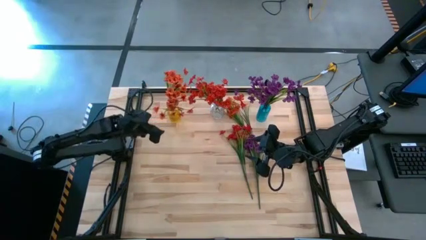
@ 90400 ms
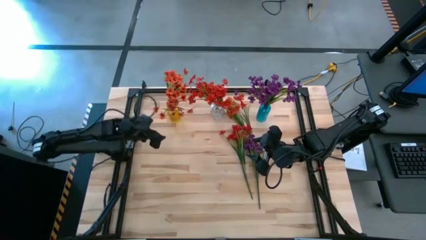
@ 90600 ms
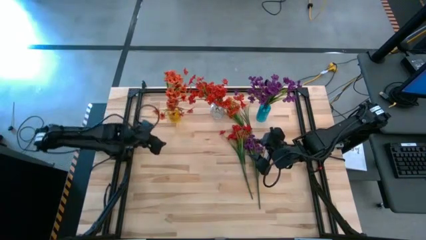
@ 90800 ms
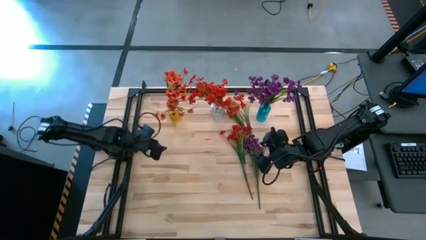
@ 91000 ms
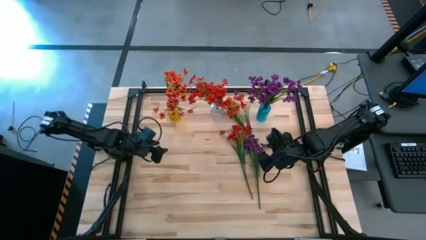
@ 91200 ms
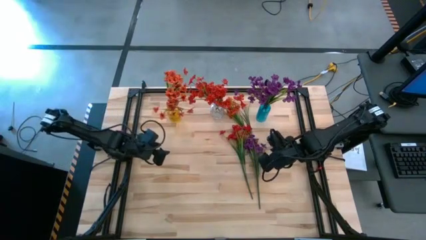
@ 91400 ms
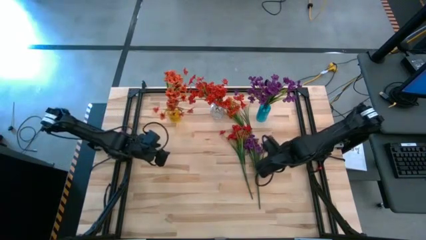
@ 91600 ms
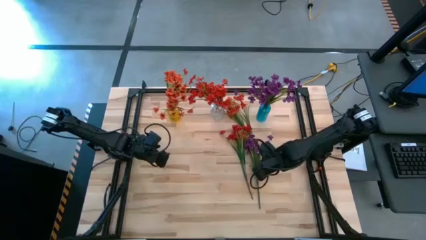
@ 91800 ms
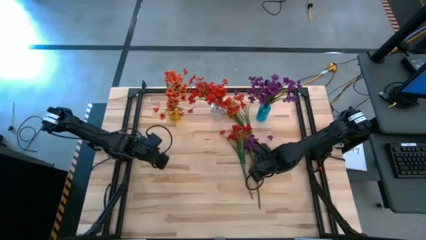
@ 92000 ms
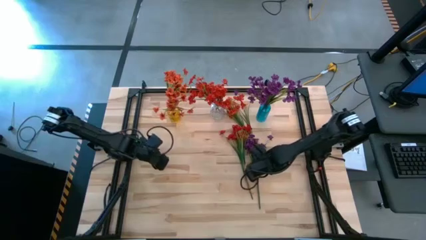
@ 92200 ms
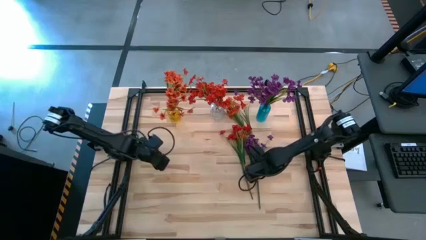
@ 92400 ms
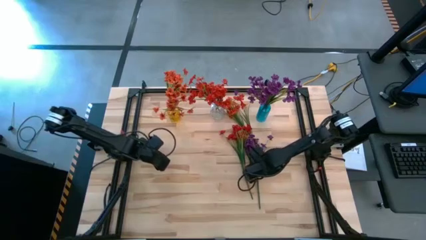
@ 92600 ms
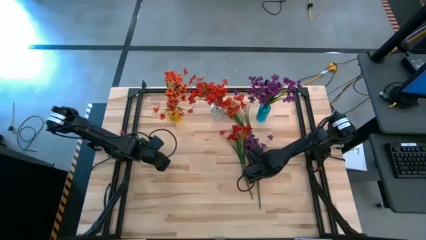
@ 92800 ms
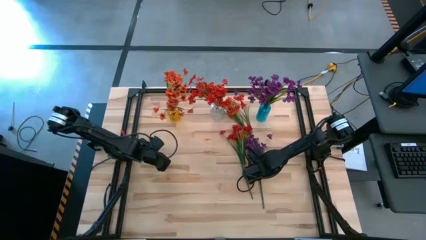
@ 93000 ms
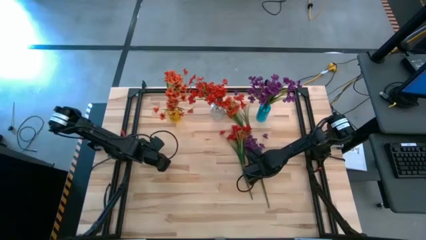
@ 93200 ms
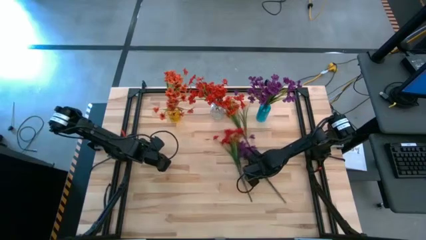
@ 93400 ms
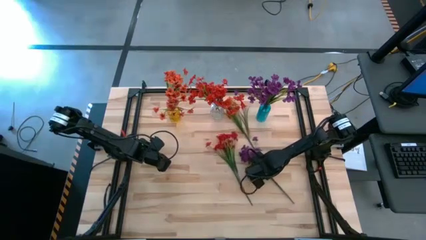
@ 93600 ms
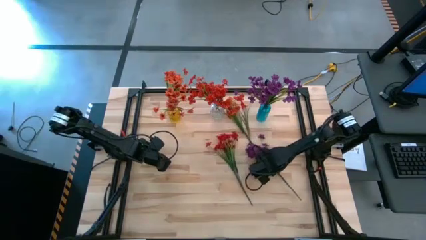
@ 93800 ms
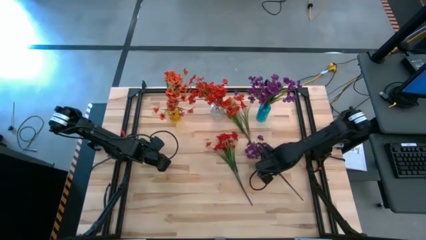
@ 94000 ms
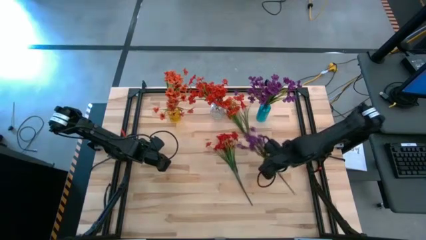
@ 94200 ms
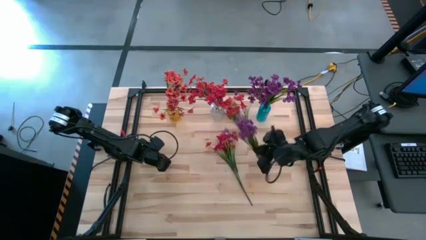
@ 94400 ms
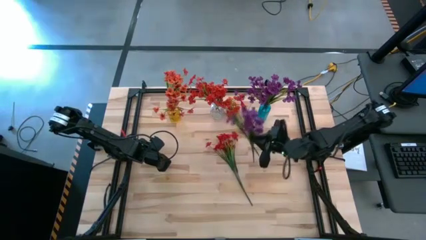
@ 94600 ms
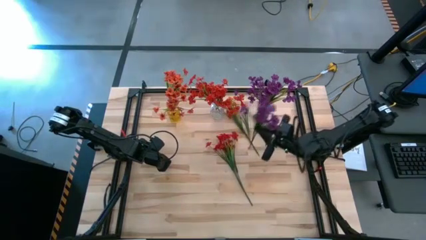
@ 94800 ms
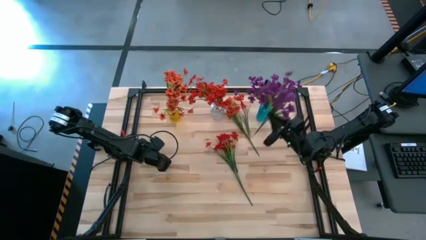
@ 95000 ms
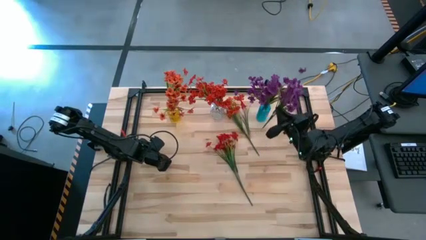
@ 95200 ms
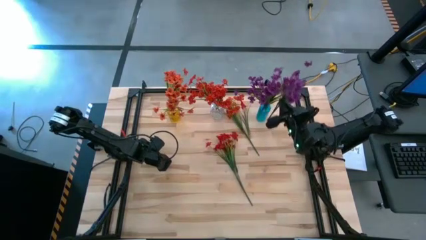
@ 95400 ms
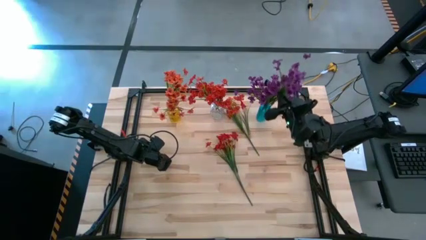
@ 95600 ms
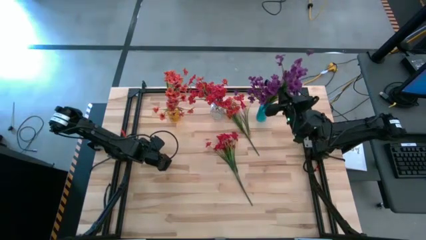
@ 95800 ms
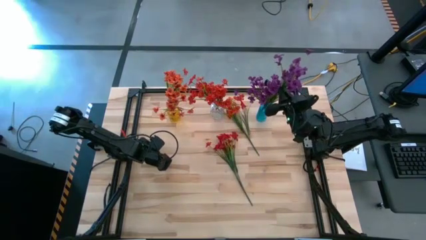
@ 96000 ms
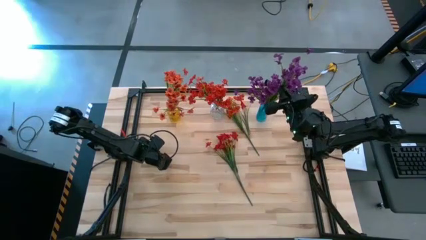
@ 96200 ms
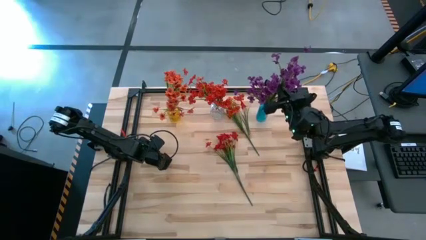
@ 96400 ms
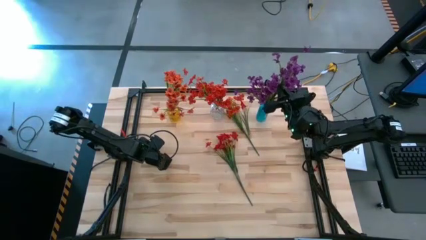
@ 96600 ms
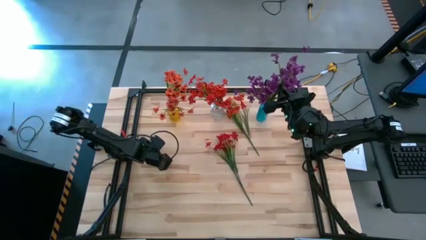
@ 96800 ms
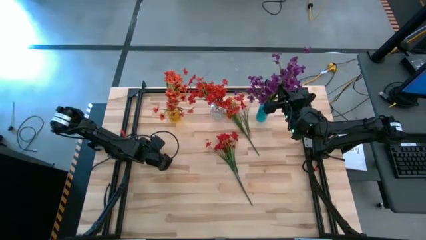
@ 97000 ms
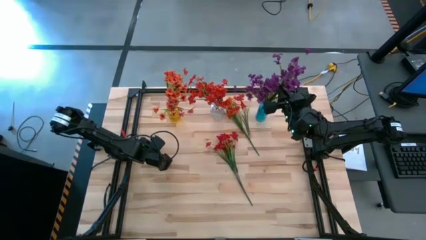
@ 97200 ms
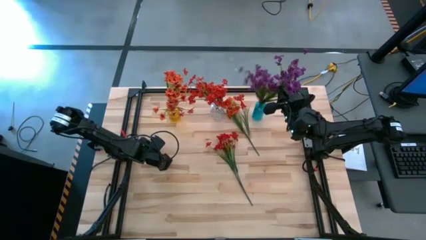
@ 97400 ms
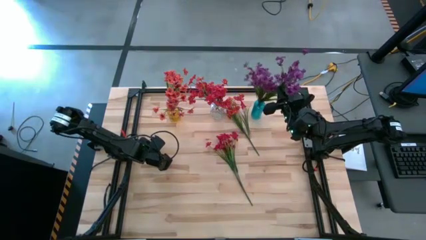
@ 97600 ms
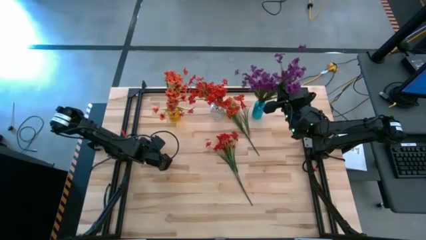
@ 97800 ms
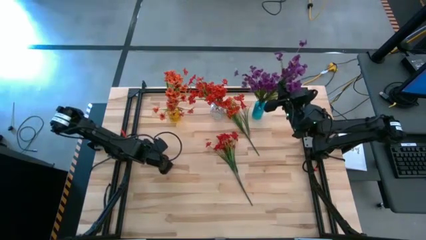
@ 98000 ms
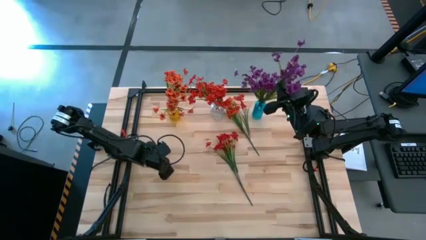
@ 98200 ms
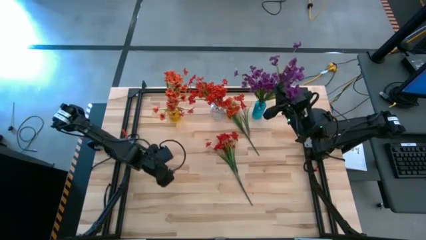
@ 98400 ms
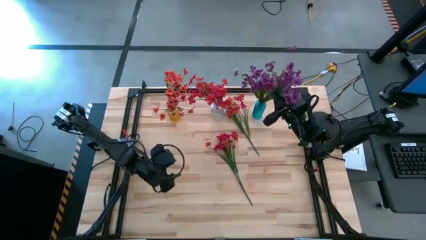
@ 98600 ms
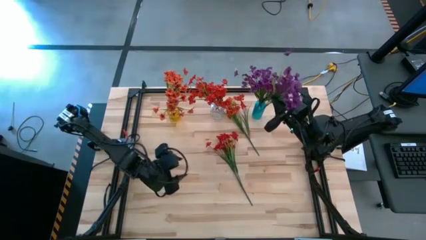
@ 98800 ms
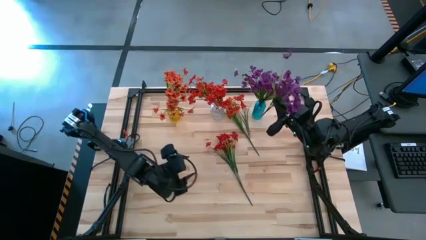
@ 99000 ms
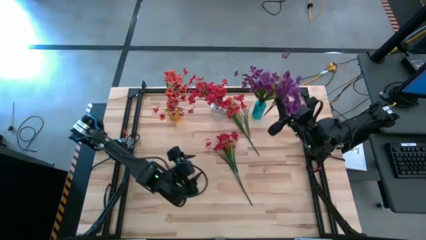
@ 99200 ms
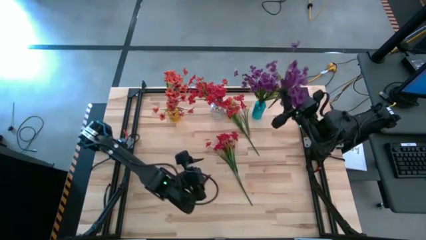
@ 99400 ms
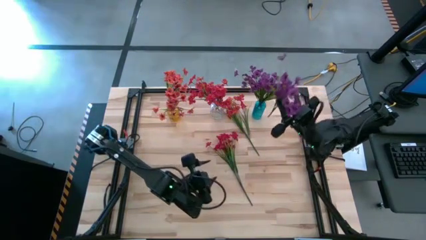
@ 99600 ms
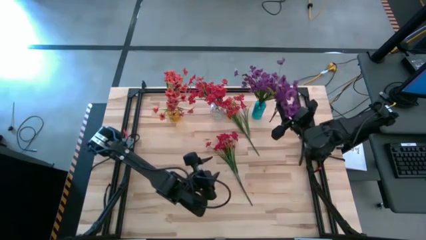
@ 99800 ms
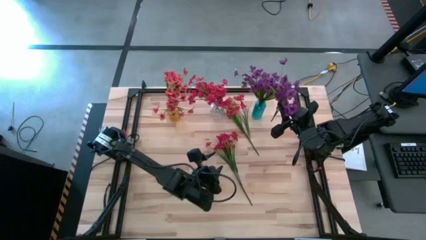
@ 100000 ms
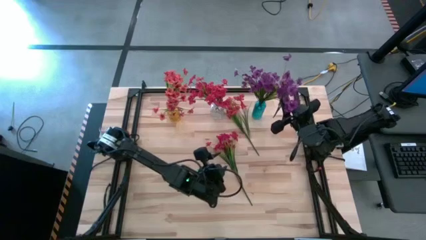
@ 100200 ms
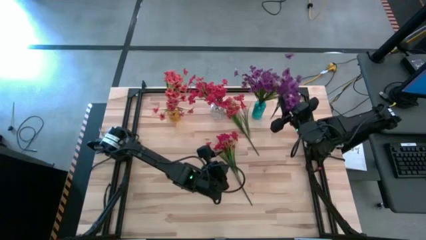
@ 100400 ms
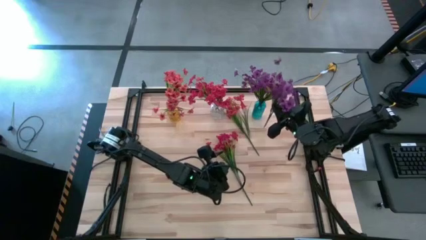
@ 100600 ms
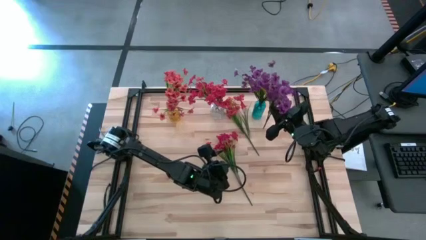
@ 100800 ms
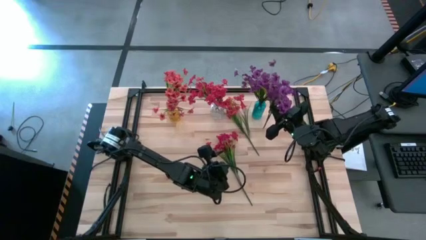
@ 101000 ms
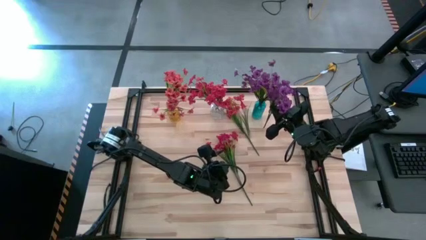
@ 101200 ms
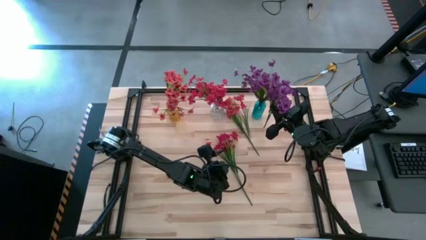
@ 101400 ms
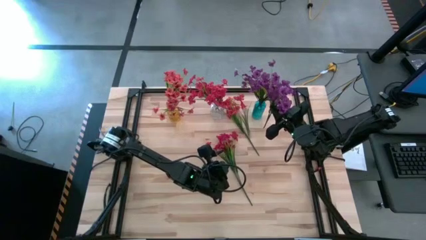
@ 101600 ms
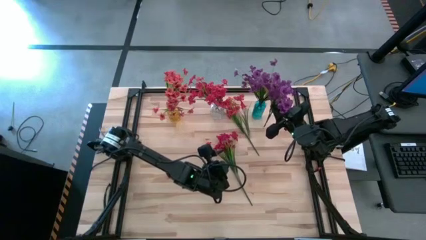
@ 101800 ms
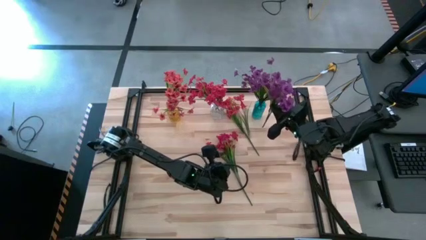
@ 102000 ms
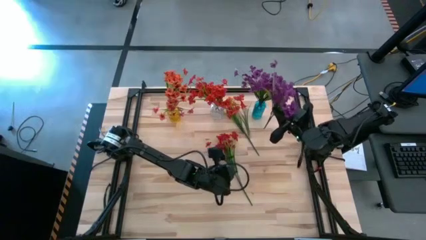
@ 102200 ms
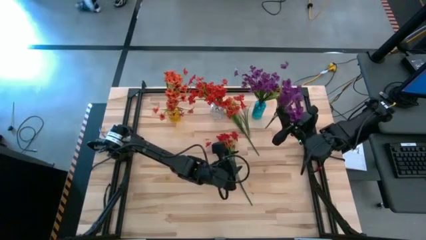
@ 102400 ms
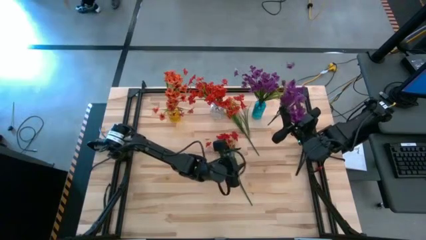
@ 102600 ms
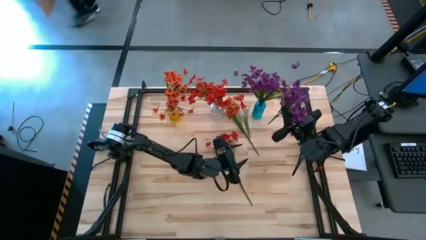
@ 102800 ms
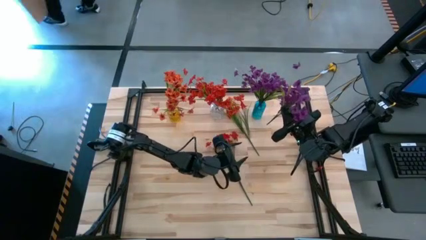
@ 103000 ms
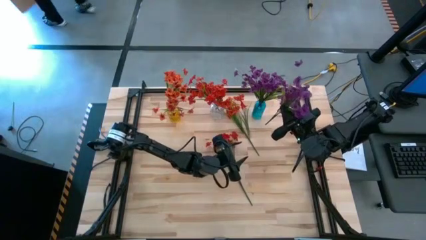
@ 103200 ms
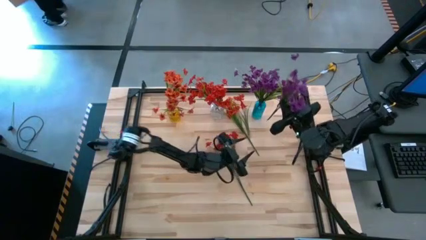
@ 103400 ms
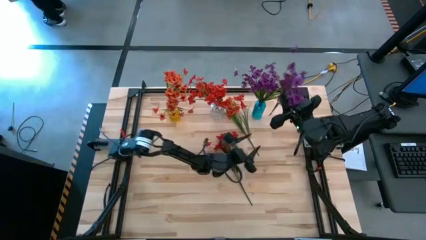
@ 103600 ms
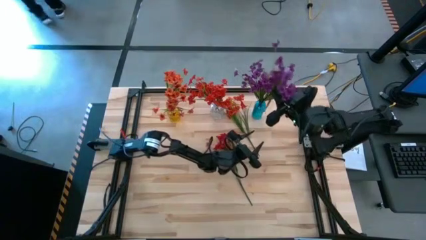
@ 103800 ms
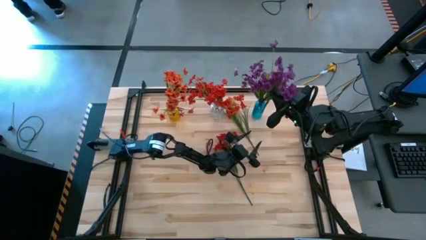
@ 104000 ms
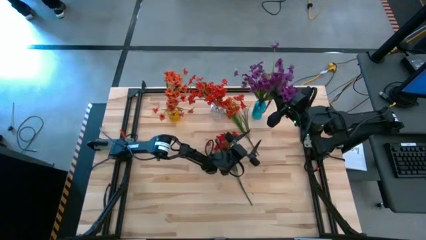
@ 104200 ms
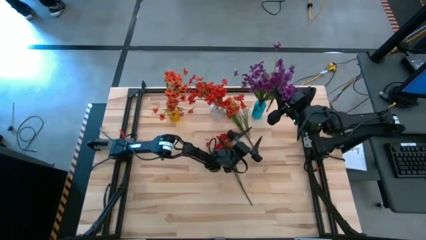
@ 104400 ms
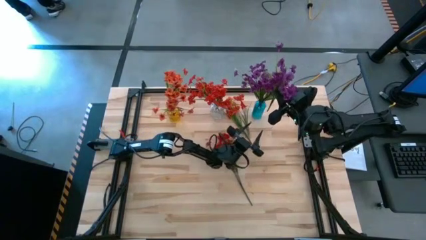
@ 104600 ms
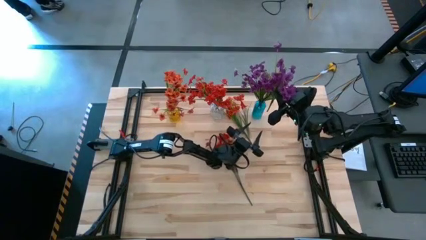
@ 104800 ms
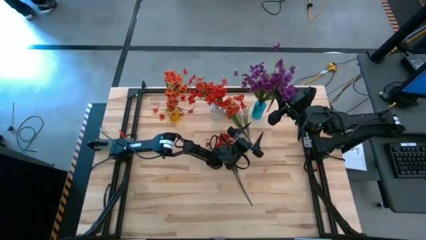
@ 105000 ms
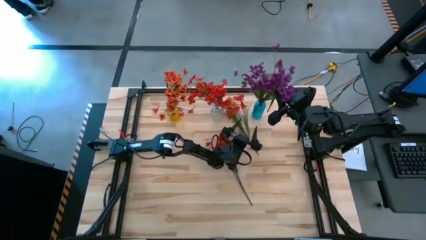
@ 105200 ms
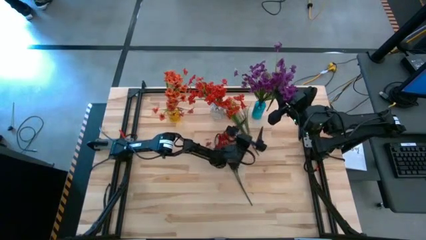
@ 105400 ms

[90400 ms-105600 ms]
Task: Sort flowers into vase by color
Put the purple flowers into the blue vase
